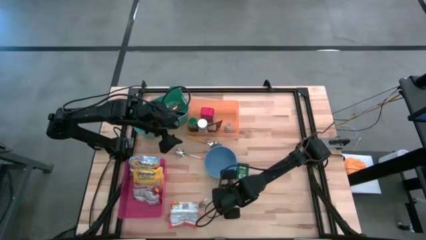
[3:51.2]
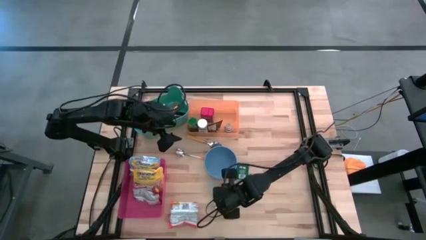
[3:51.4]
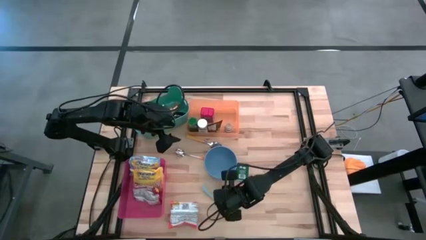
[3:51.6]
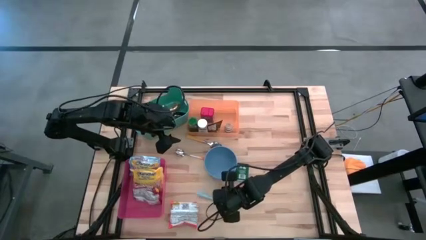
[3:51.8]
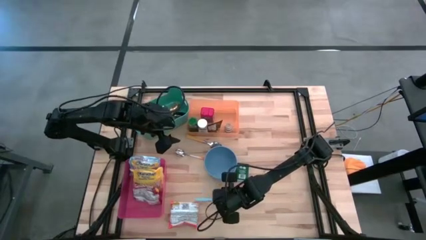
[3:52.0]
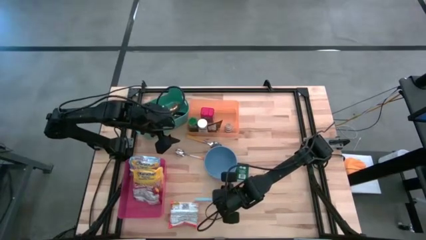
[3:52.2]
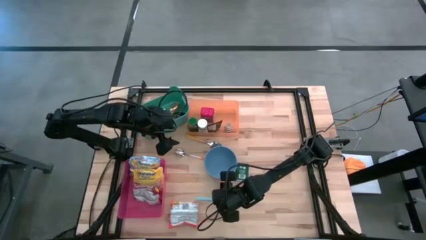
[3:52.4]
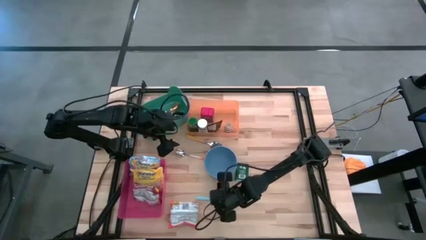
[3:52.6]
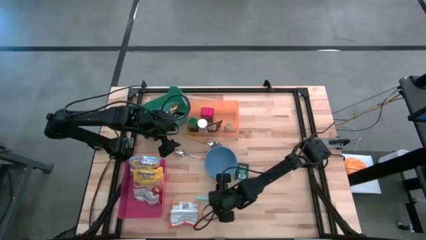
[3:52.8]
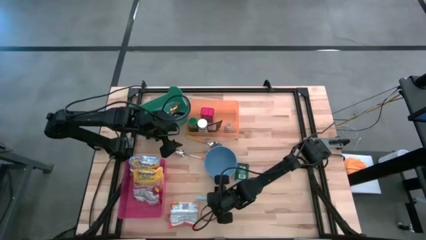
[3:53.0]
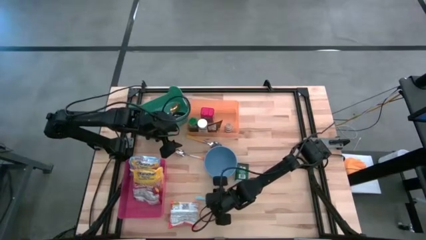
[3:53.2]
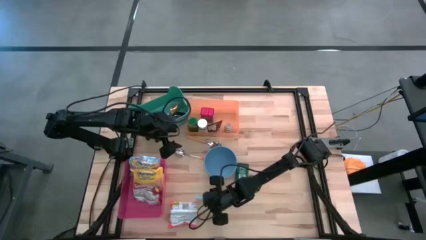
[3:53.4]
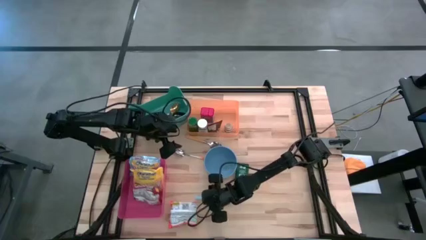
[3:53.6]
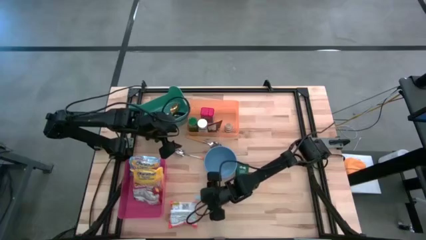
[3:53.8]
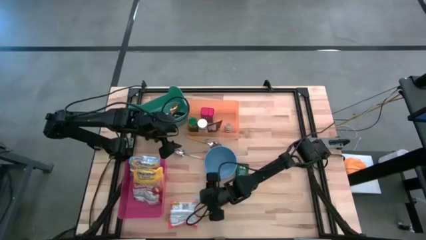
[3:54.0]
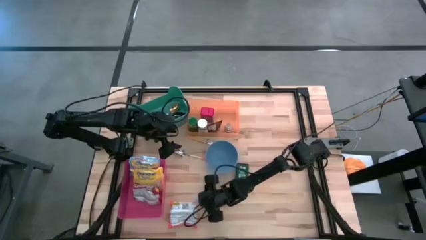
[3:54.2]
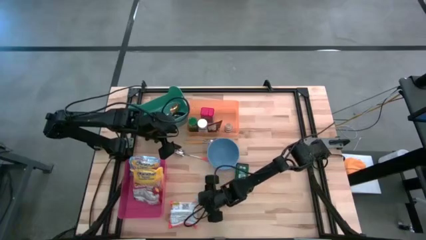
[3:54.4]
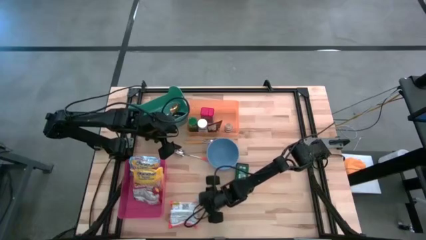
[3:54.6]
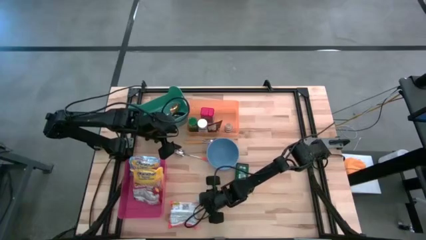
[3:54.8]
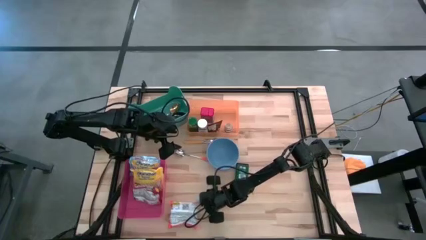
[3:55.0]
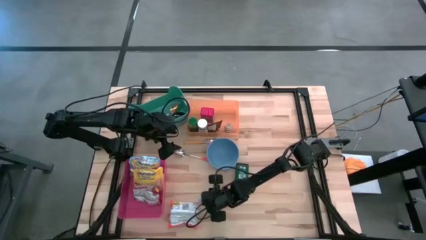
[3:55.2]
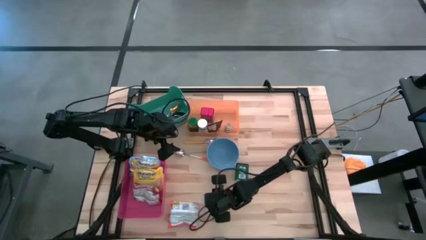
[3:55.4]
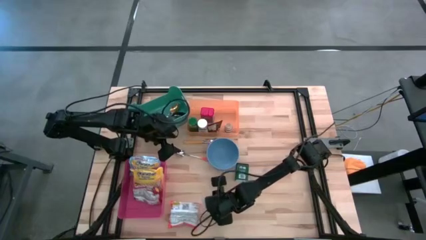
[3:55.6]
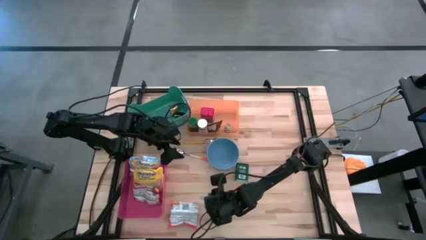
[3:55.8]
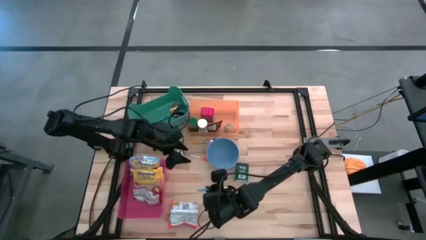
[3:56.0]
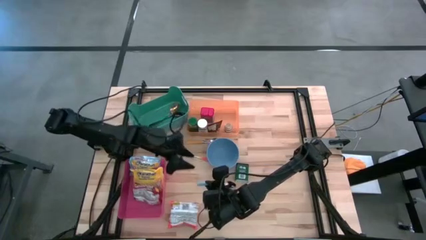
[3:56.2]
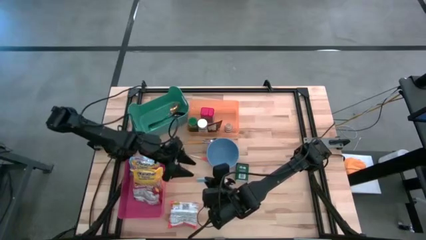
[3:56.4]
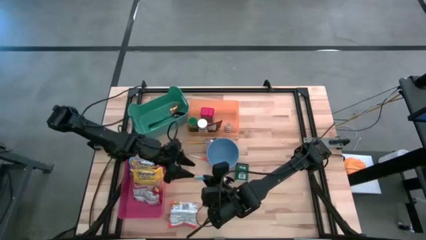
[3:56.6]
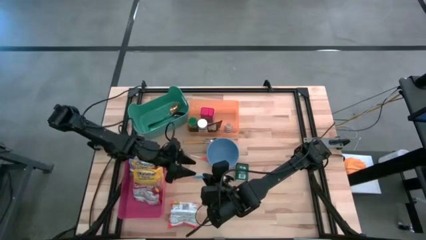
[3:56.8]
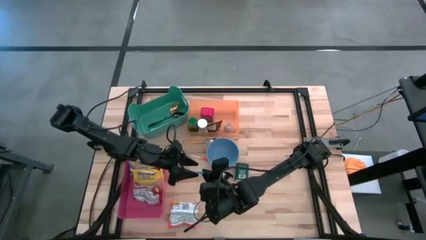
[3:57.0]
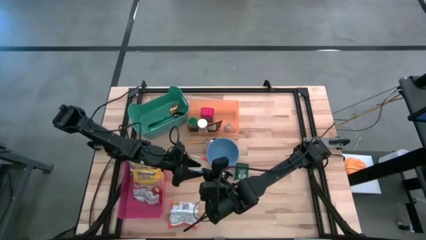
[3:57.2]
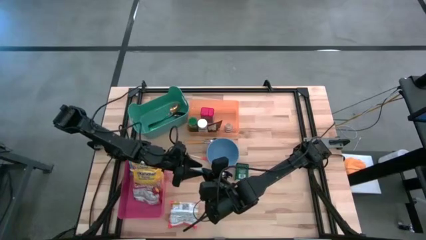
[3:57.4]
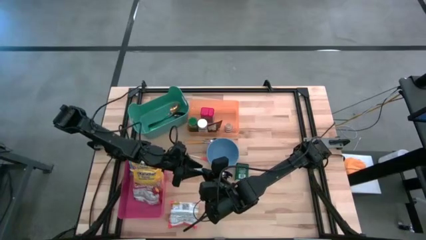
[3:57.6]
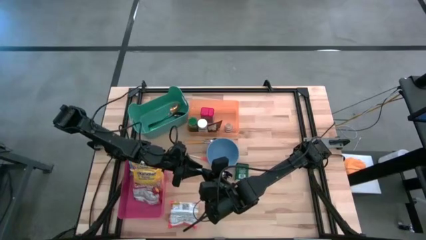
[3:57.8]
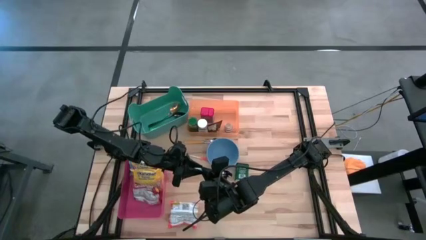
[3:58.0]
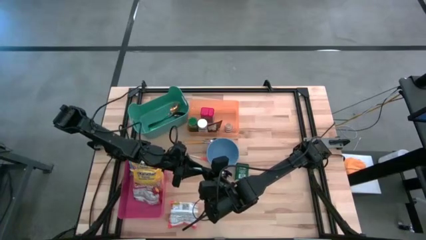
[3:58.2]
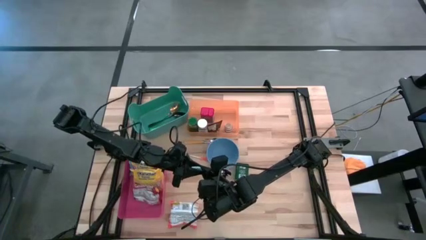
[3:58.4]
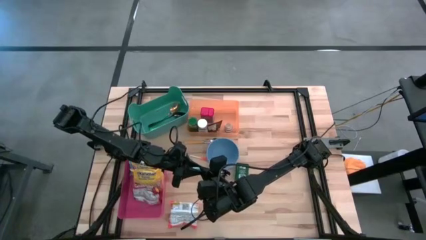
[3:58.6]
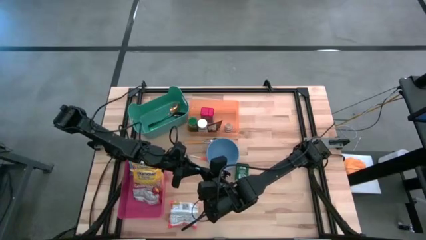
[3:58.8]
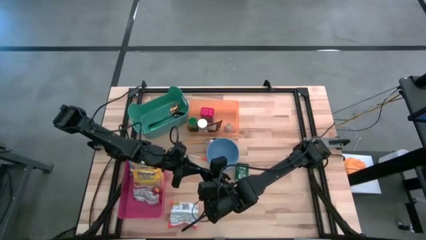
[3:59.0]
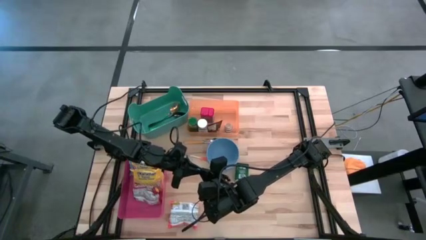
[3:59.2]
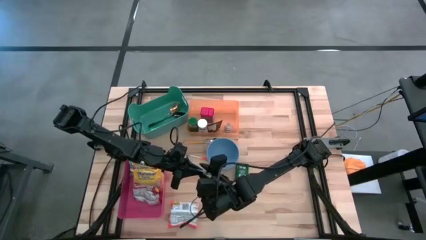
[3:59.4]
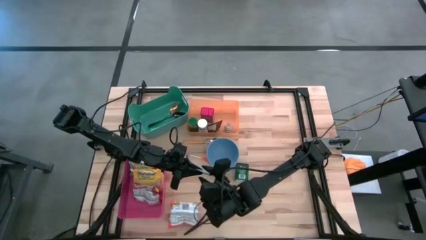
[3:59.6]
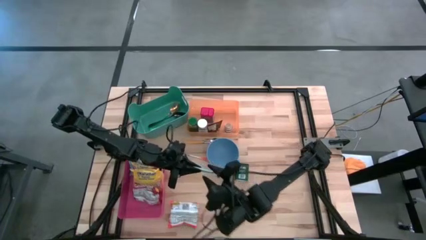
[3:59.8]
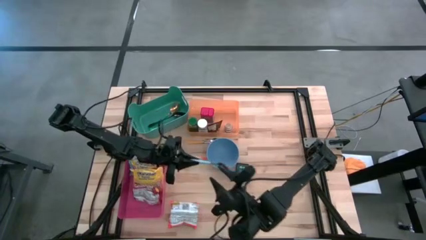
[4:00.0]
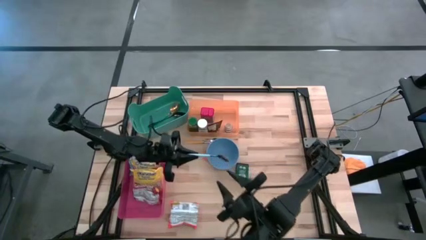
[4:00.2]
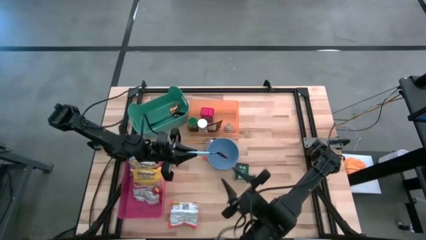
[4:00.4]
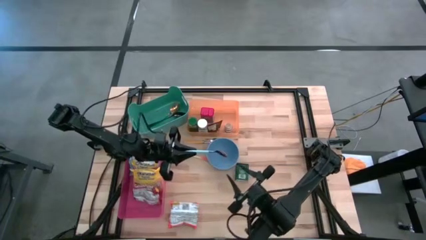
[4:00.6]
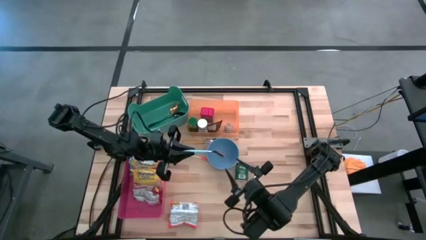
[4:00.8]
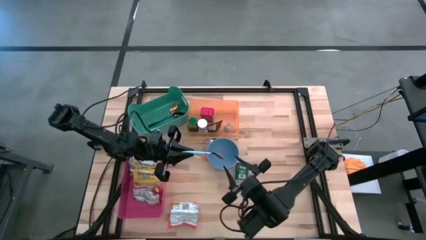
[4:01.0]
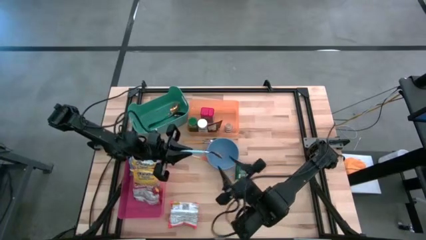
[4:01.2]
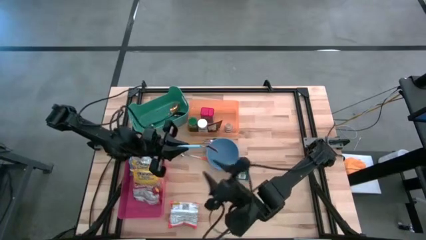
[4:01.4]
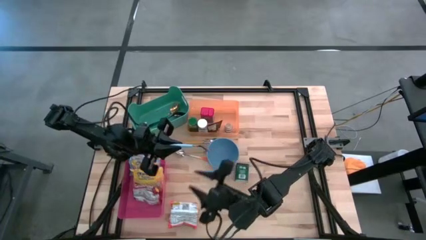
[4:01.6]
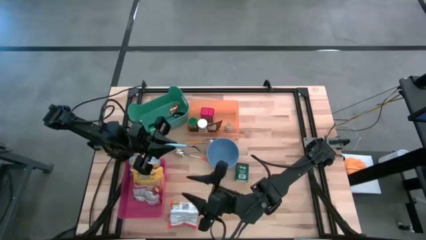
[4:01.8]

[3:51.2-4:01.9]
Put the blue spoon into the green bin
